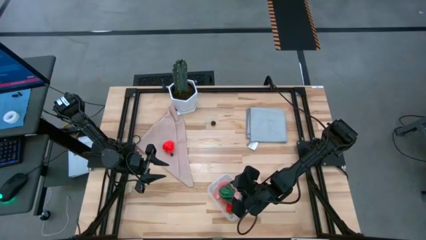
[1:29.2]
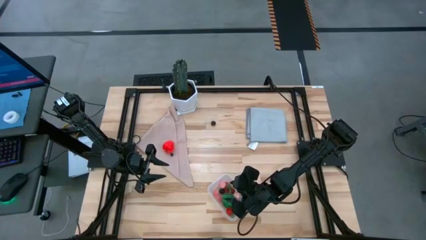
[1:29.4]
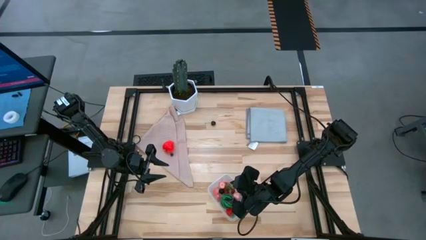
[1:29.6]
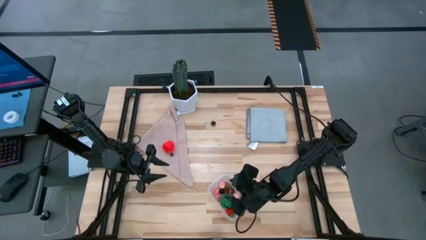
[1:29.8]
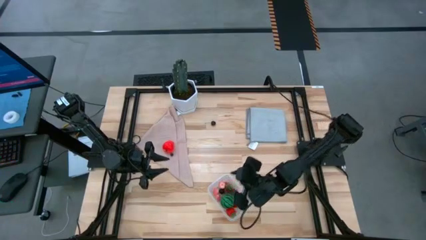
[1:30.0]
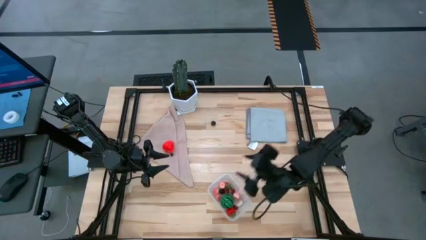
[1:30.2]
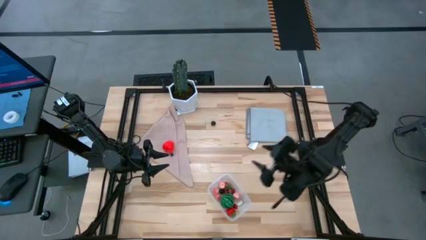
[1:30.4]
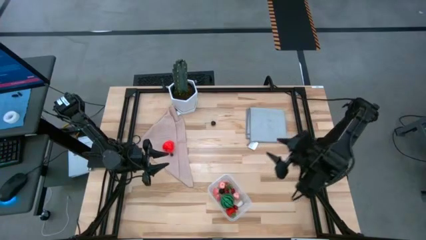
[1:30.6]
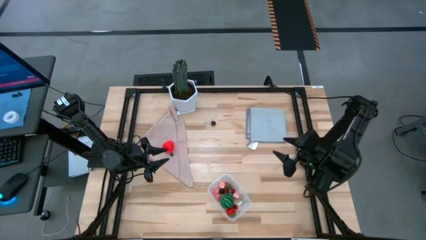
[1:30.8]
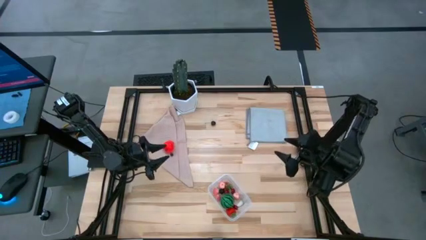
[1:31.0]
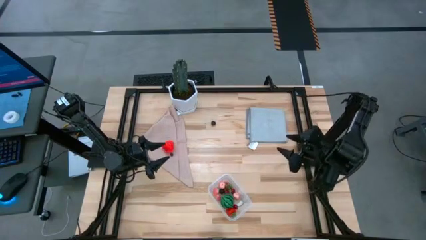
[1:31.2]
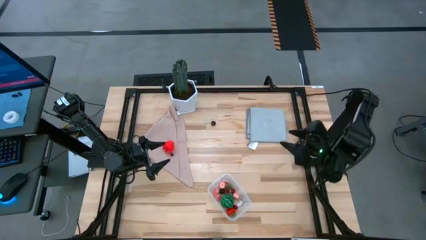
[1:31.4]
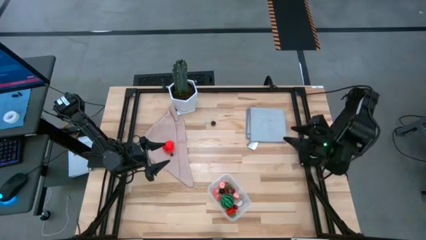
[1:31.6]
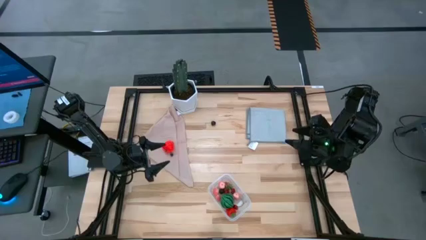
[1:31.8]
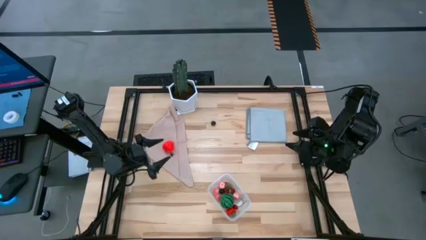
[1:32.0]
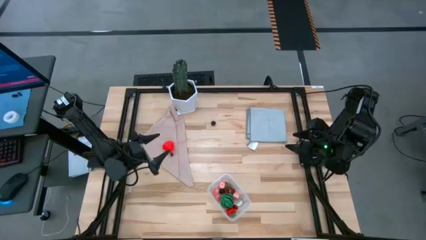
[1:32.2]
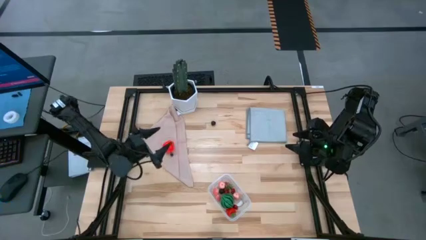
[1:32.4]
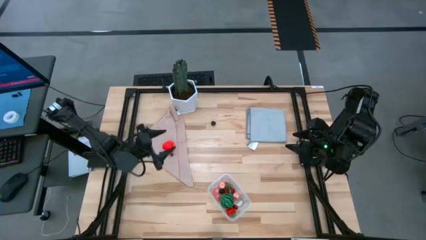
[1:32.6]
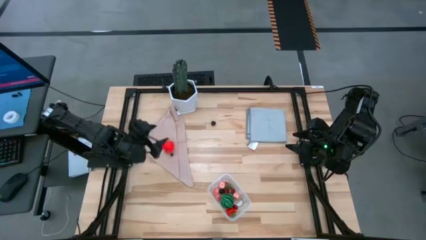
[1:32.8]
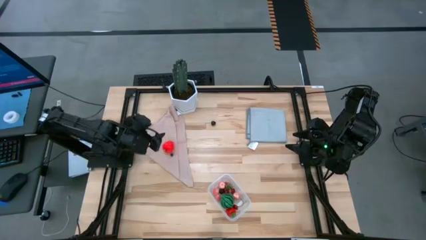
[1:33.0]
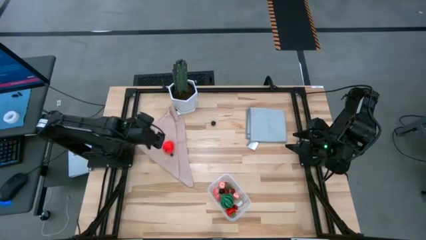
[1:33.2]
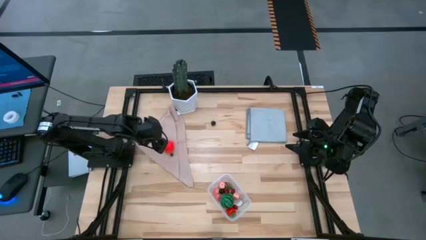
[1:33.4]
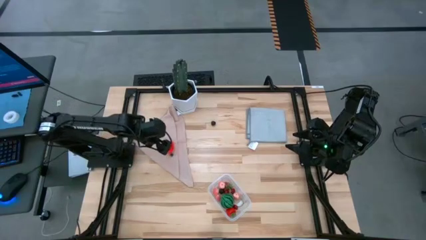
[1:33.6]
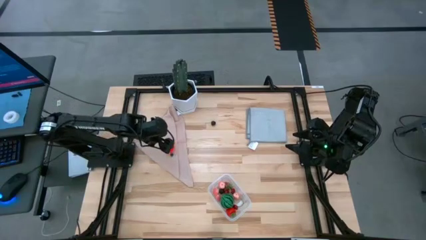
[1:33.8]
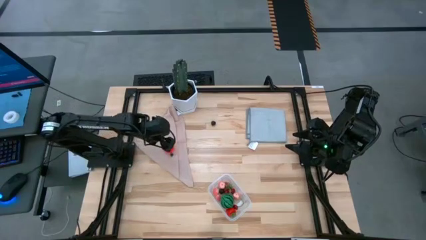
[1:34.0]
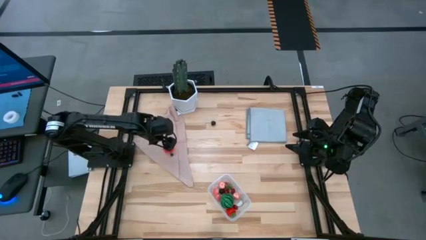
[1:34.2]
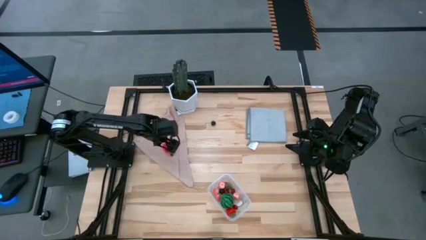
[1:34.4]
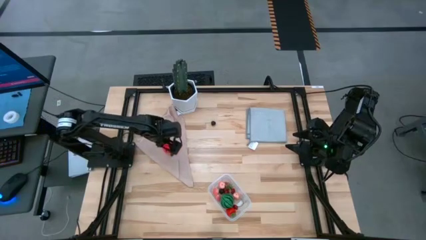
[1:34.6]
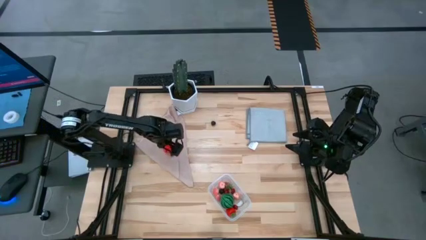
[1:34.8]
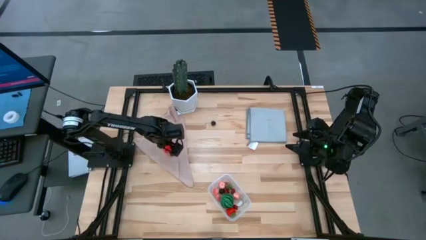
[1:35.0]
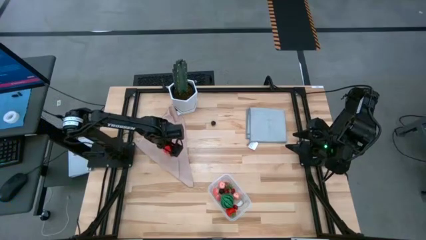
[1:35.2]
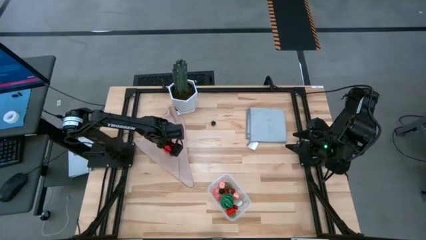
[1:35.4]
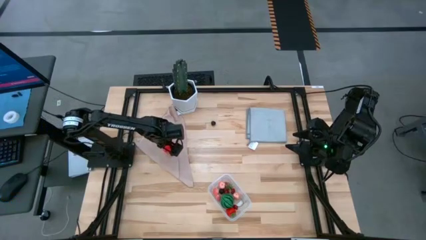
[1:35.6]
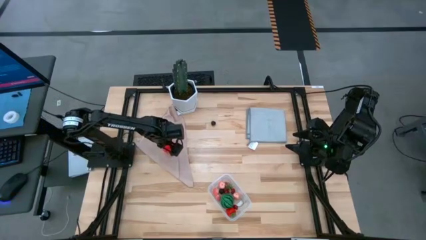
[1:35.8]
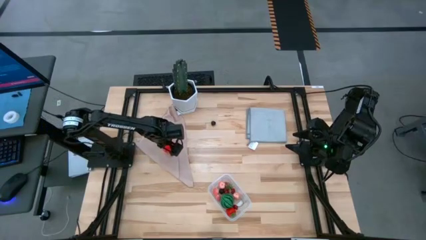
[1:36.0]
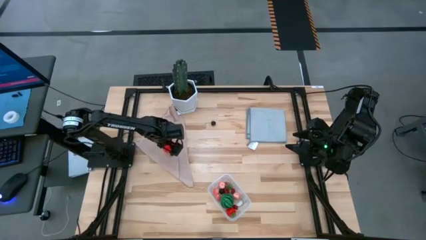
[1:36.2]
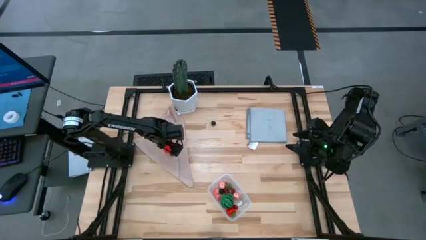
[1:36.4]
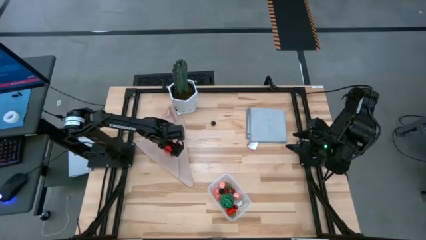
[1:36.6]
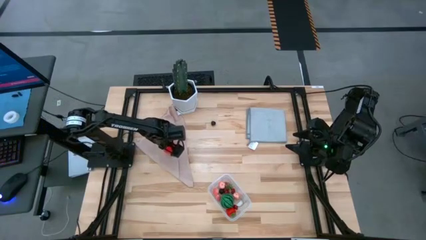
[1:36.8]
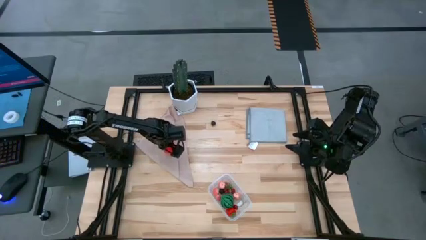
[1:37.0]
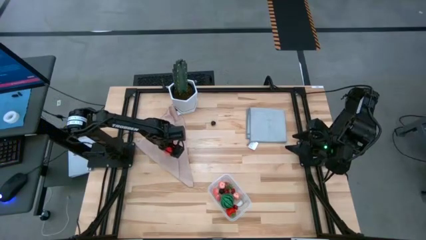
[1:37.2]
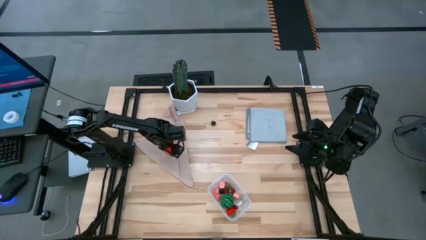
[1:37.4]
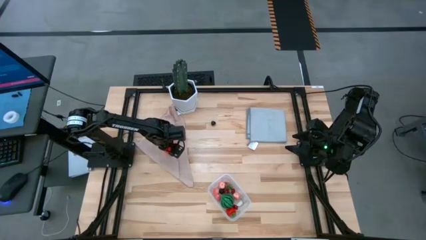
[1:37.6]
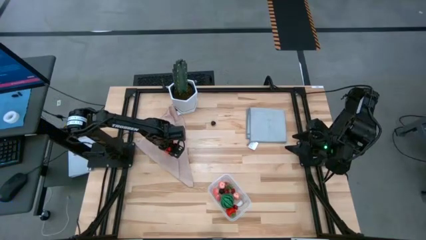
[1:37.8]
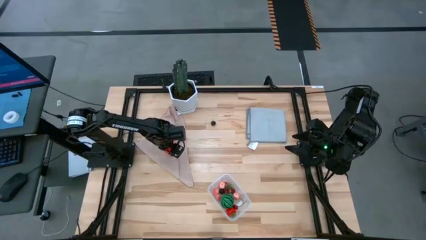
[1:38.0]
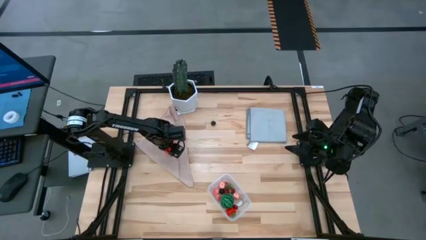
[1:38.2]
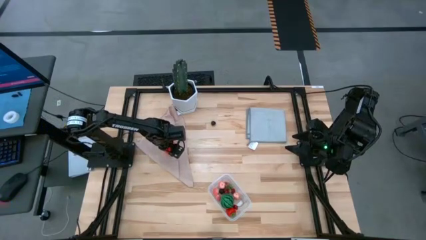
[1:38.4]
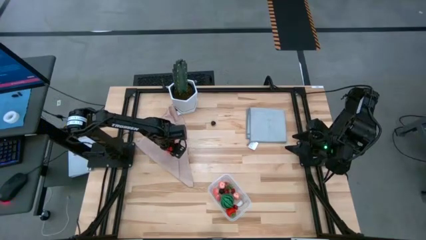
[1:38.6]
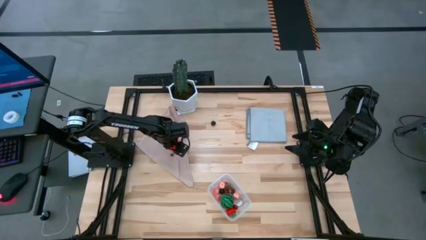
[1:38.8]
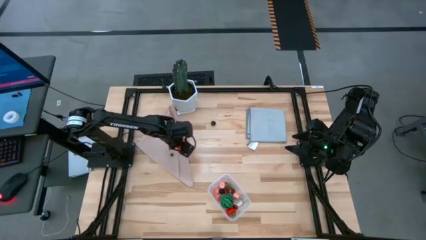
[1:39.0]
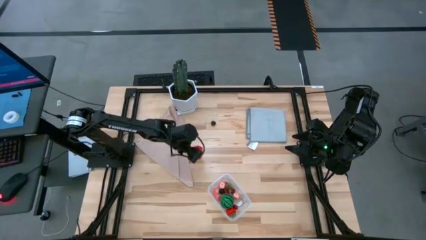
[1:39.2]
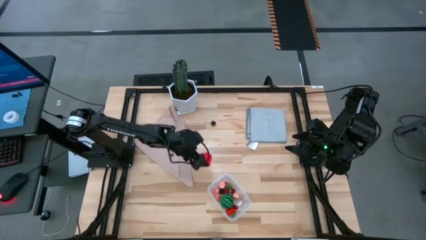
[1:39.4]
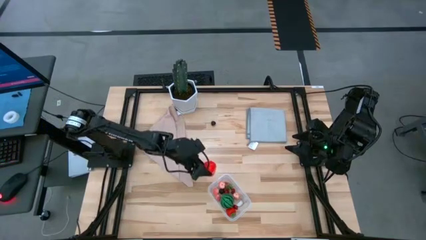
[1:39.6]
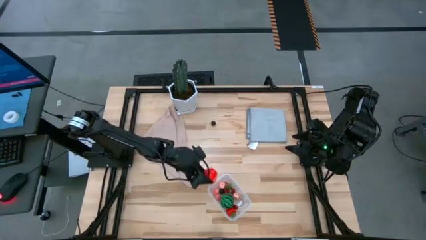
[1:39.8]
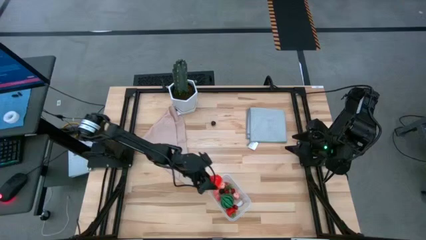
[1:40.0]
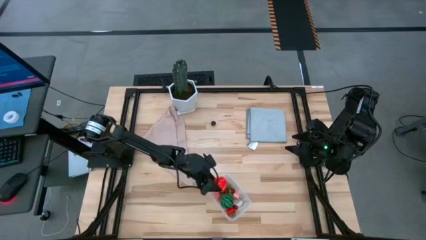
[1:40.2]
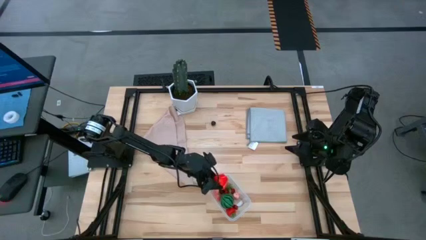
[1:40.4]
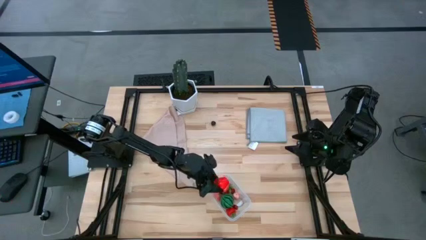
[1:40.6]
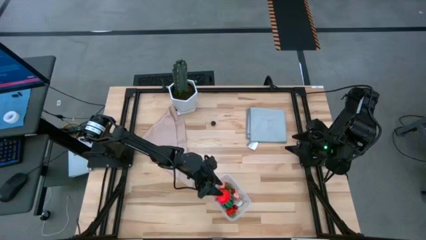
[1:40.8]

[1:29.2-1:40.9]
Task: Pick and placing Produce into tupperware
Put the apple into the transparent bin

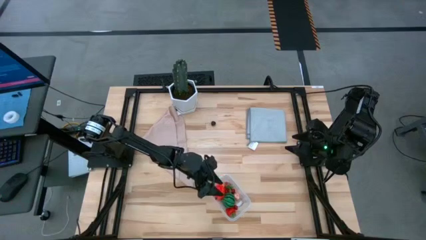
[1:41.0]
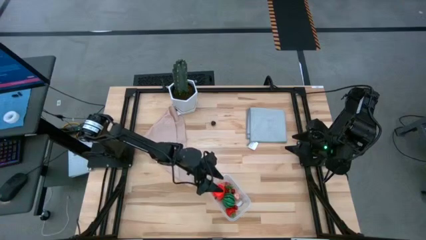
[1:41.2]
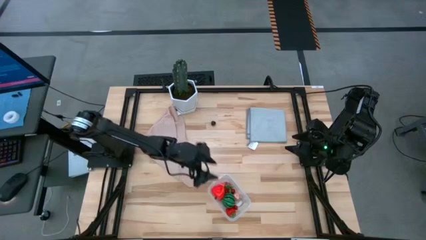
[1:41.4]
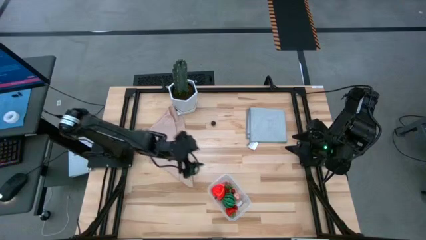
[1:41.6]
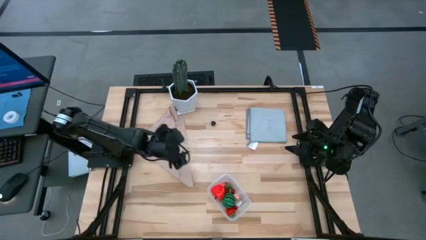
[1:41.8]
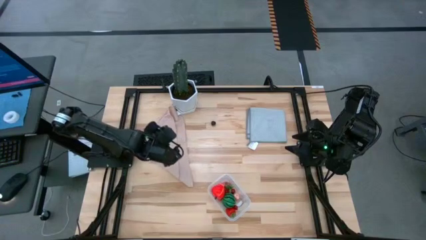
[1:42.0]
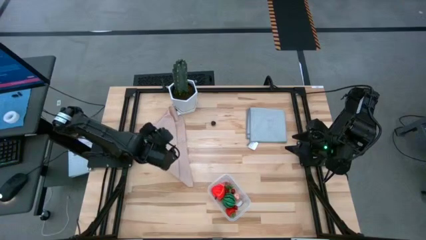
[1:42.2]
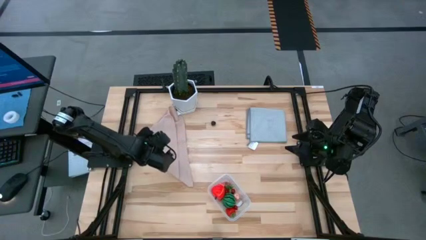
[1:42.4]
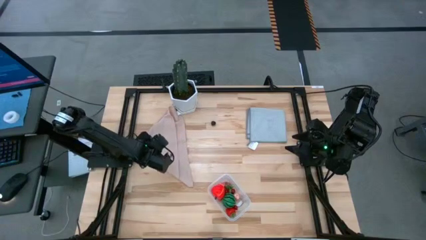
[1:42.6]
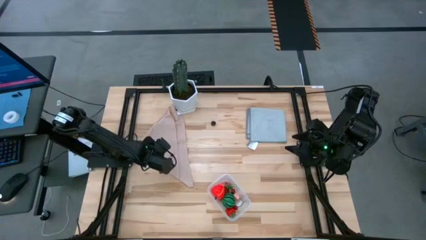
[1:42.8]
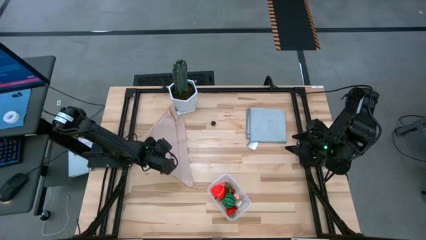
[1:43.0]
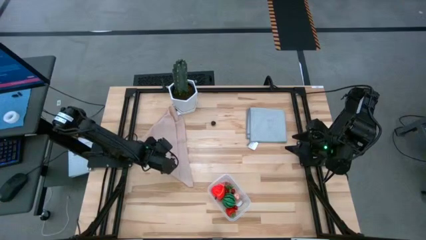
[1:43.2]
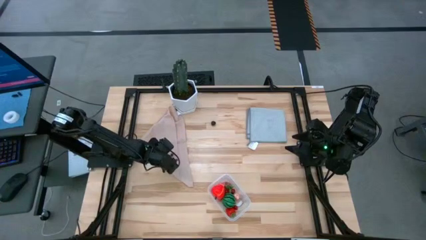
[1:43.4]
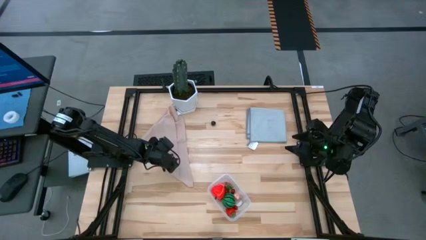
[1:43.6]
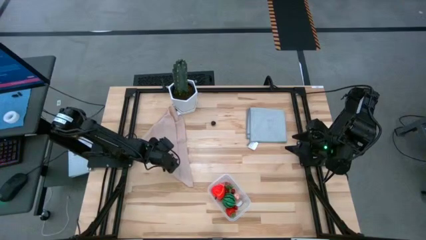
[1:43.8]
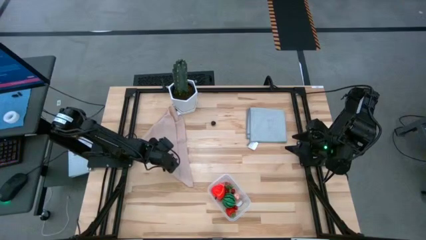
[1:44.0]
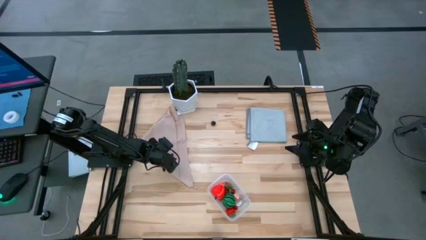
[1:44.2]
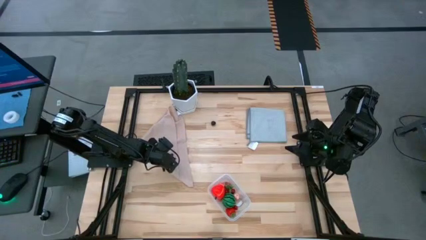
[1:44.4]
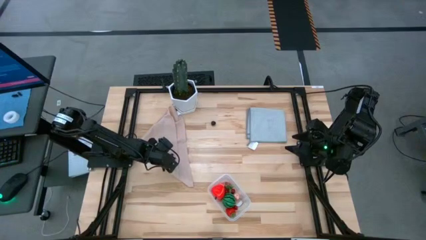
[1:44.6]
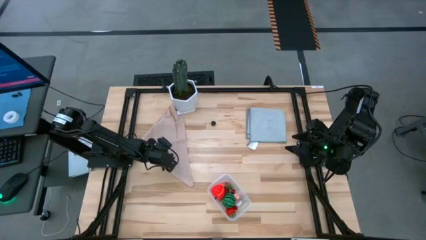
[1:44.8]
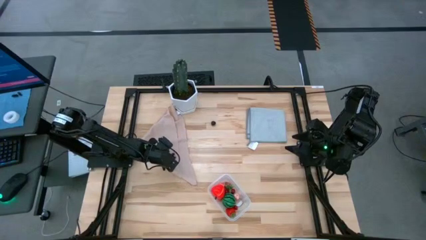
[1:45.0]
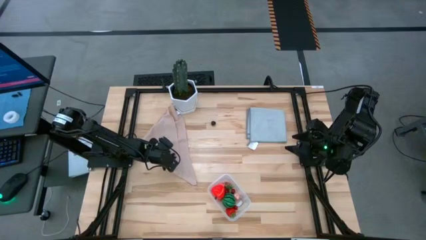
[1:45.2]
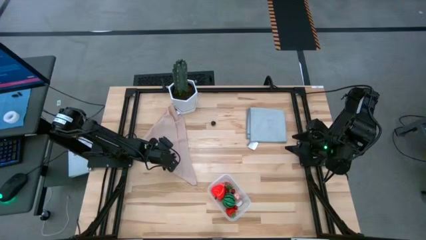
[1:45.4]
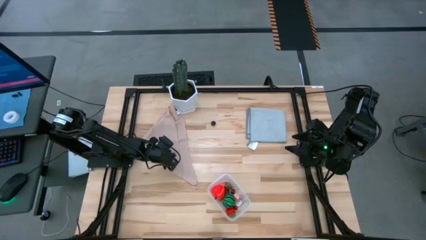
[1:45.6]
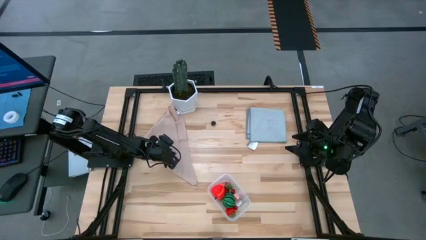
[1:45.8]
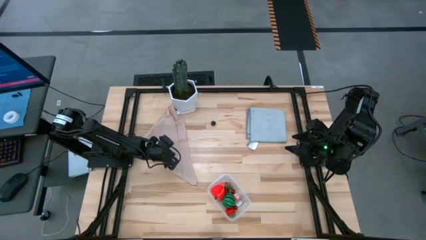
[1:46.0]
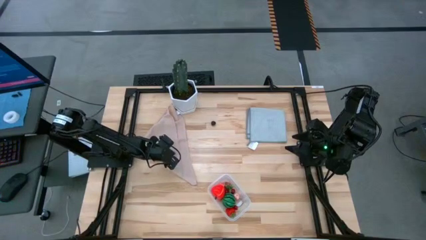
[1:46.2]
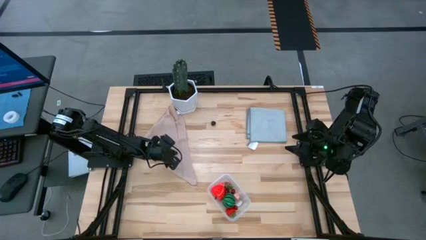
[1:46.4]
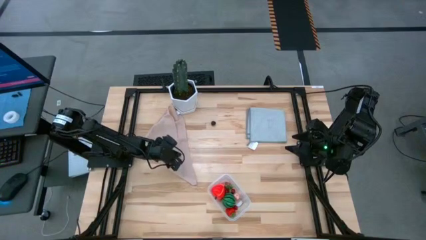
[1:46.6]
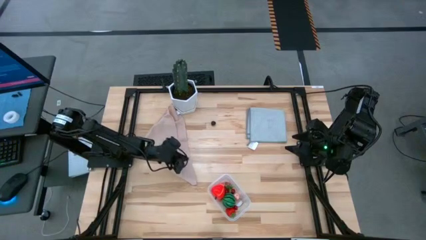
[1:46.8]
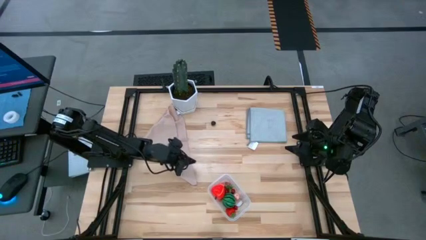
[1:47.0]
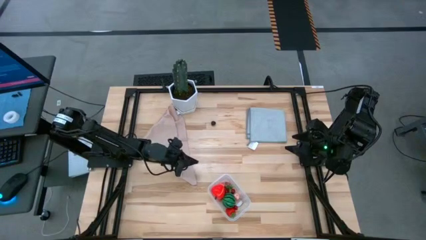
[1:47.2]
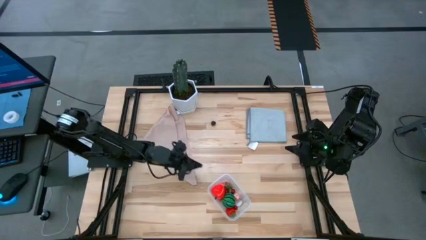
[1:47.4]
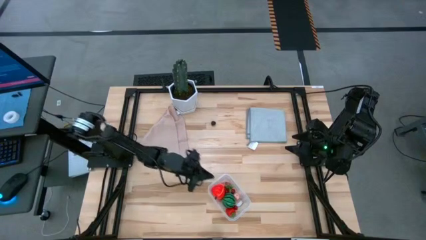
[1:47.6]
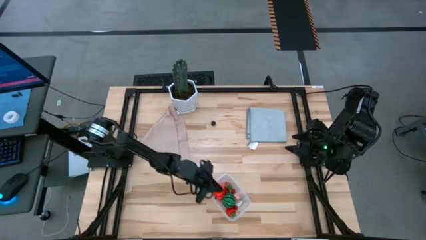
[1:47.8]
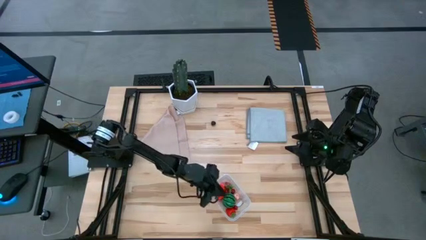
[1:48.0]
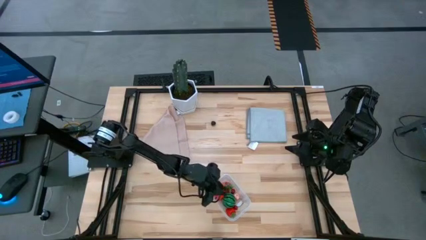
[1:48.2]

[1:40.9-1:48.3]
Put the blackberry into the transparent bin
